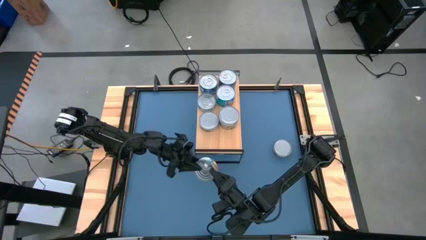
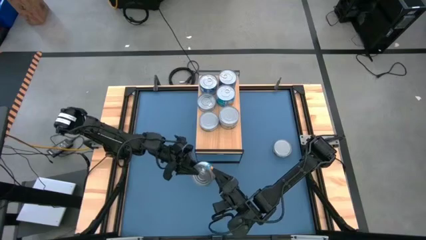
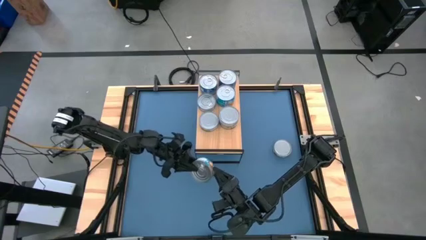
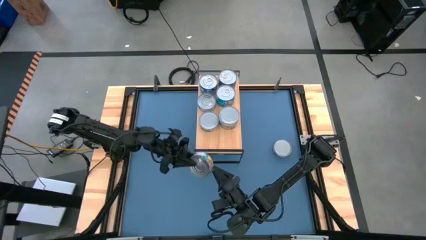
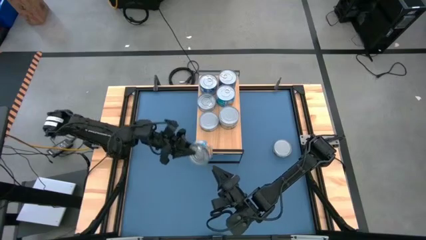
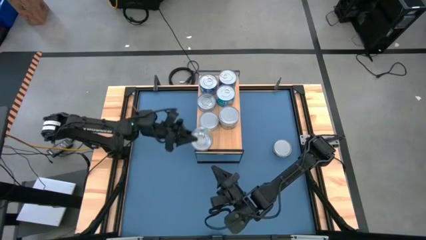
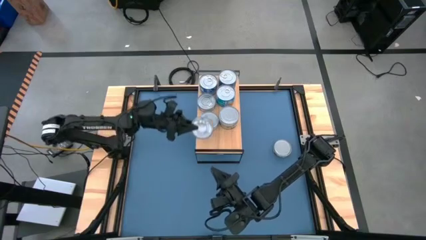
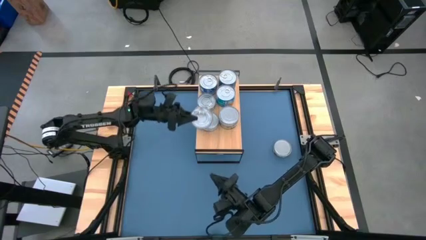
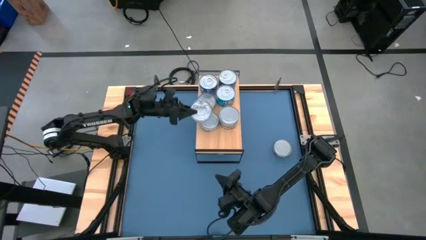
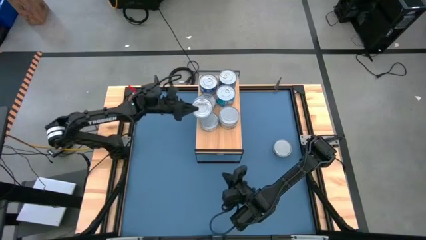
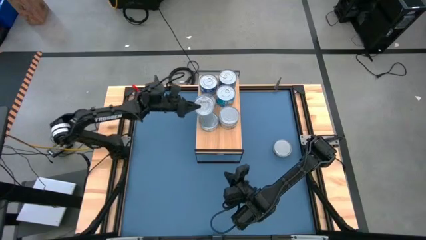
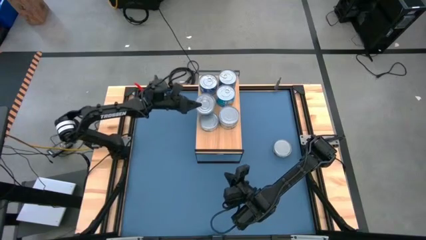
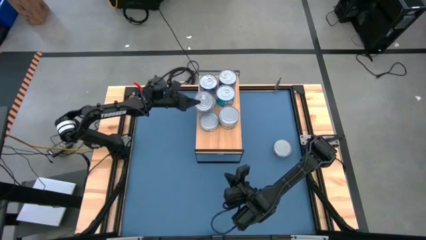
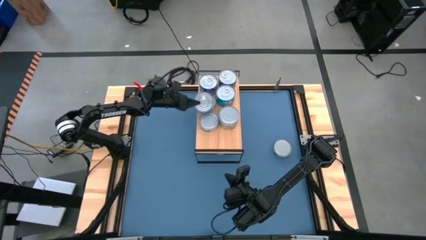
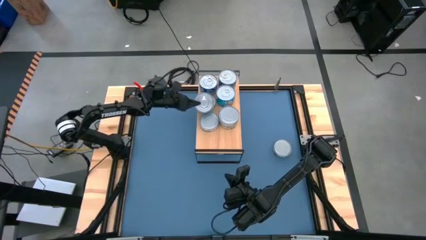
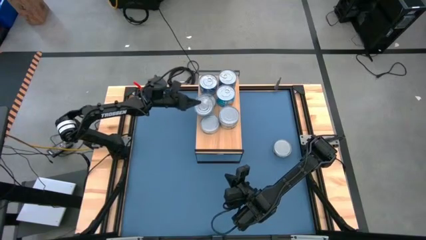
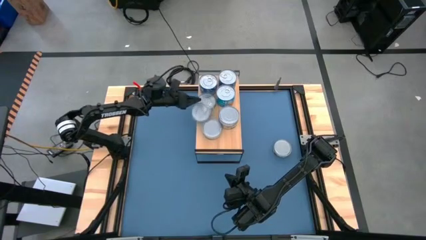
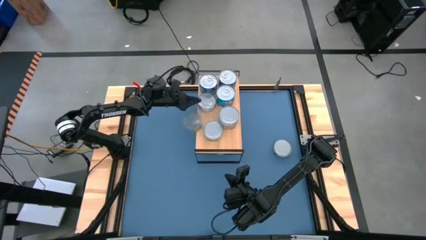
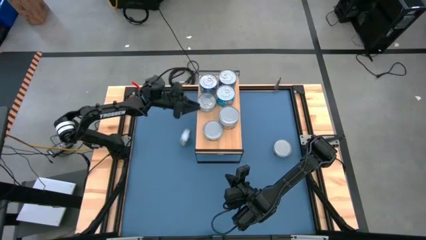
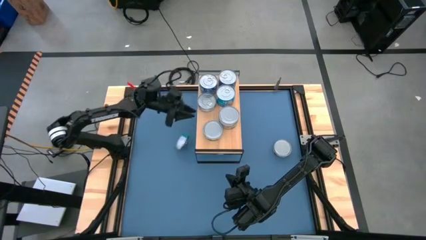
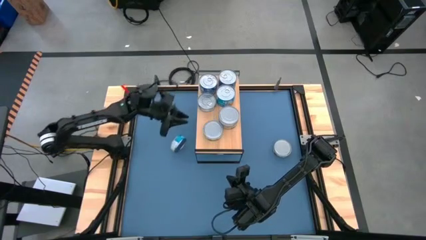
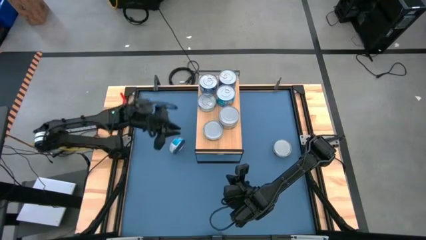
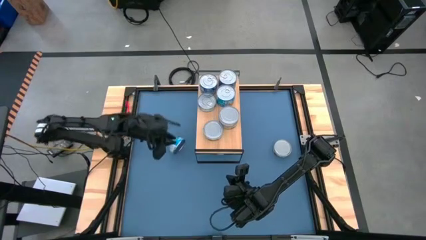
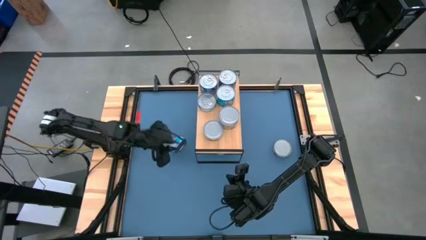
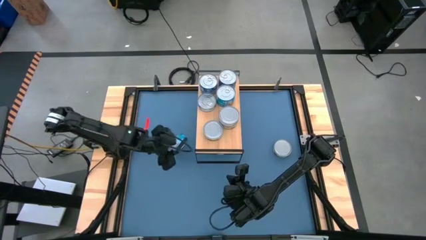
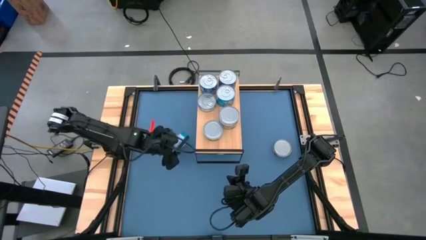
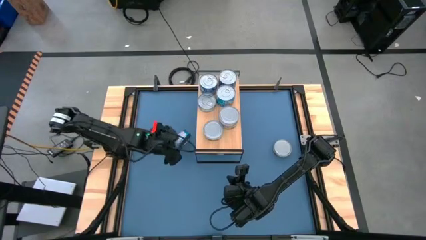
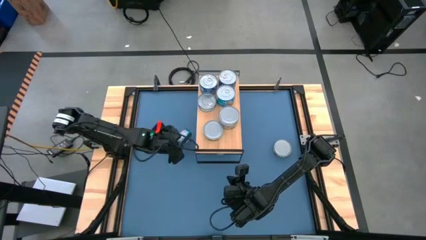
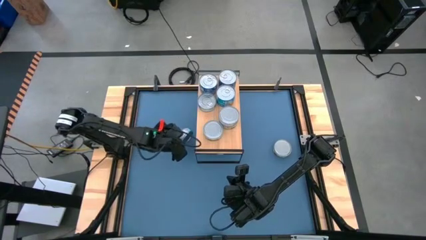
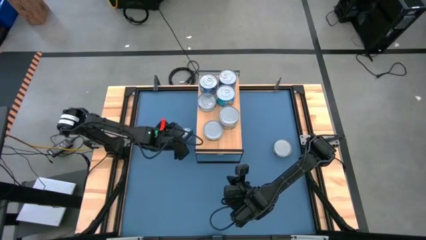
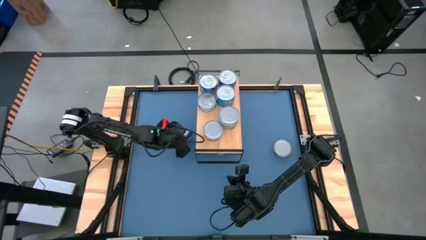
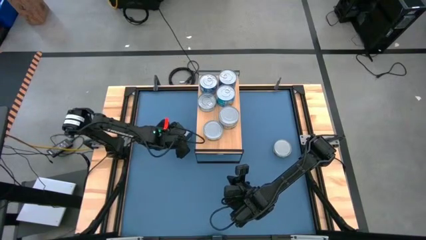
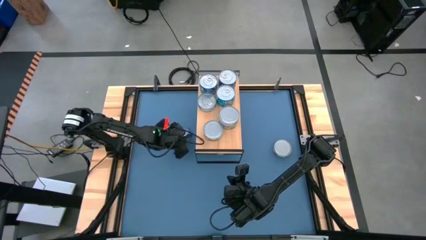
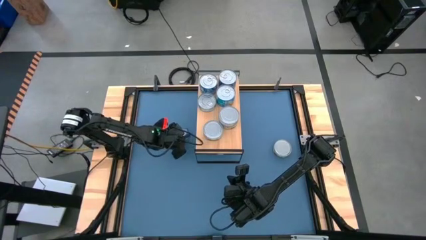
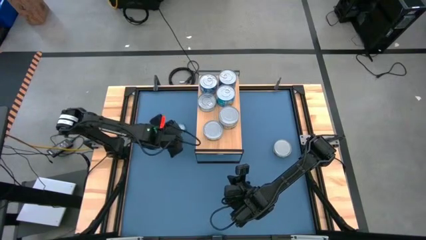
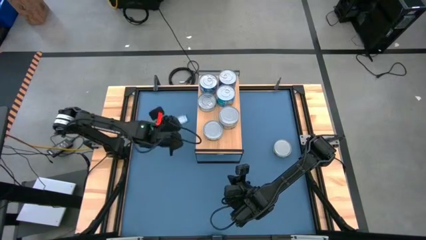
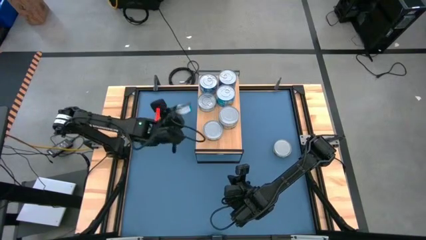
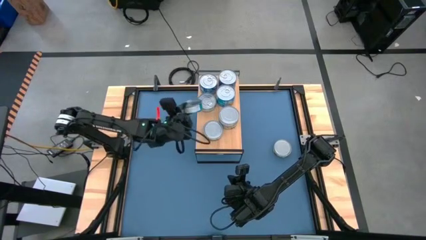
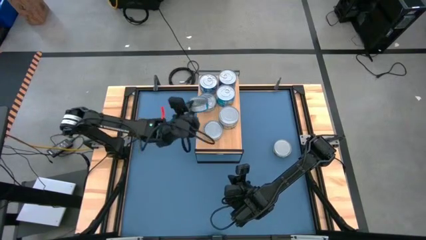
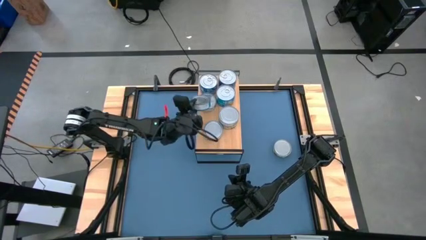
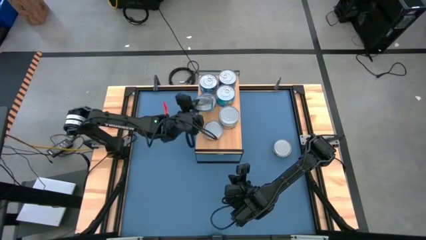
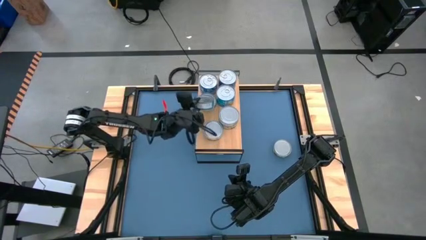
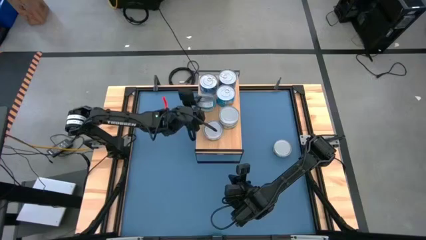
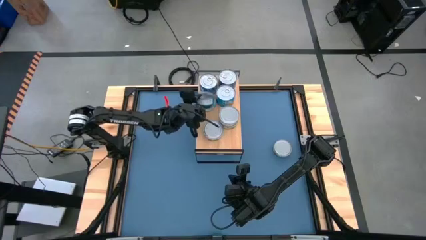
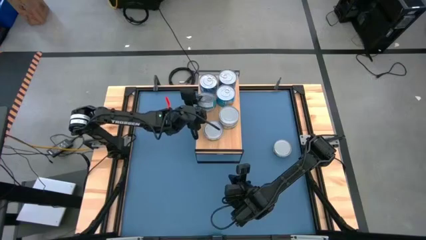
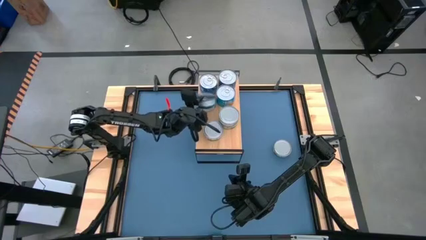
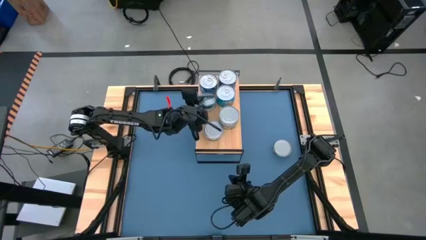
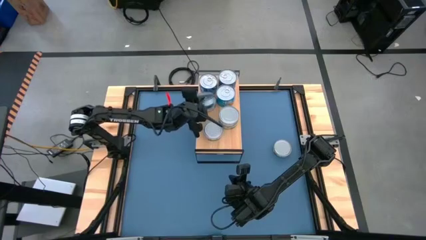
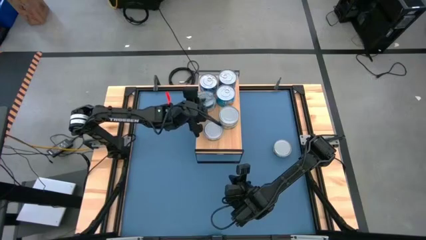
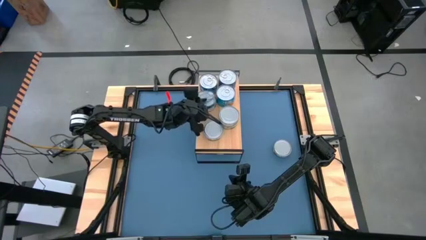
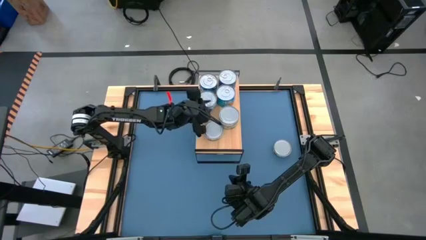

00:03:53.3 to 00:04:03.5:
Task: Stack canned seafood by type on shelf
Stack the yellow-blue tuna can on top of the other yellow-blue tuna can on the shelf

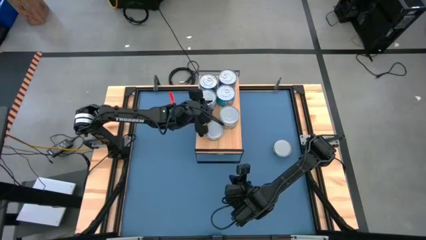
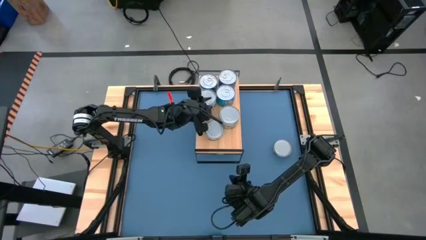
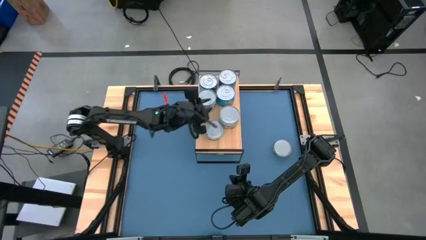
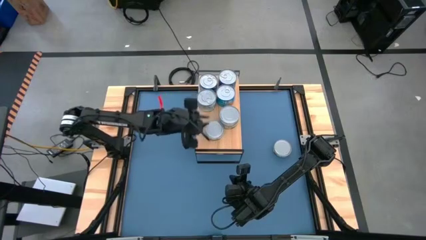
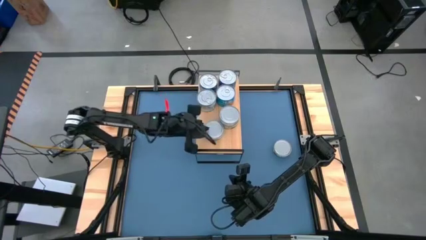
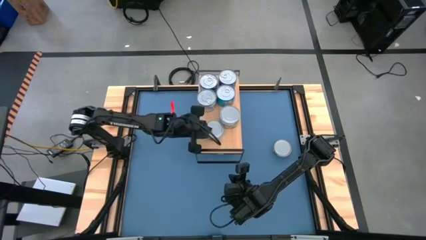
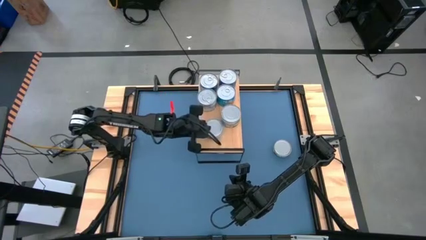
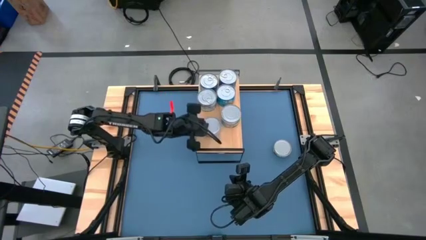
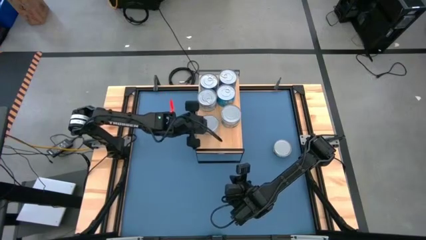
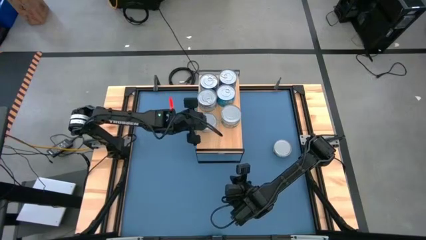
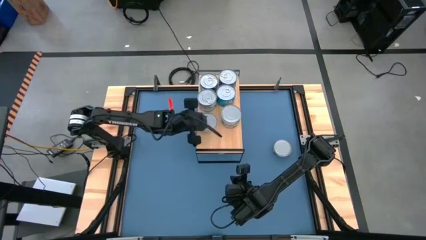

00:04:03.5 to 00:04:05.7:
Adjust the green tuna can on the shelf

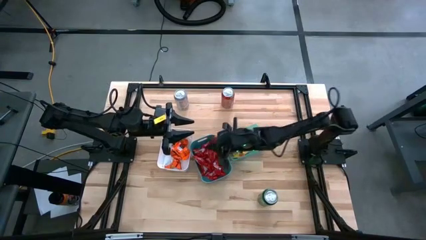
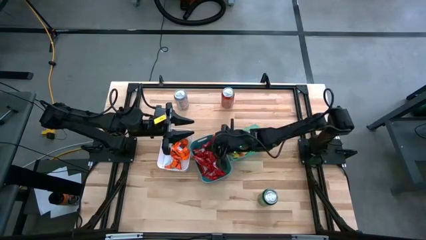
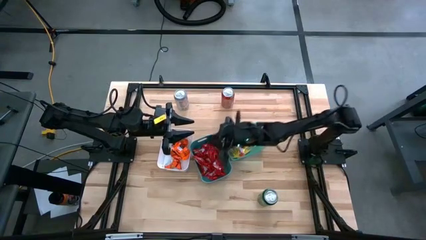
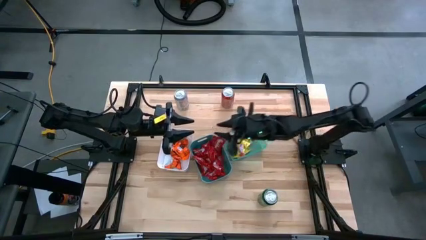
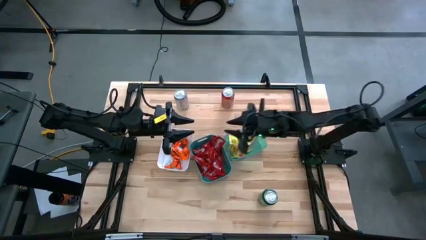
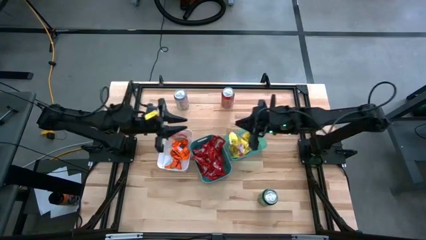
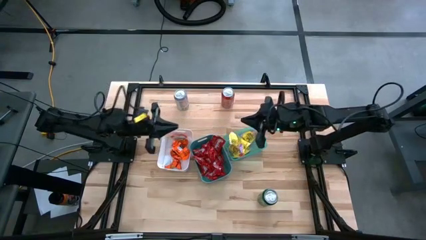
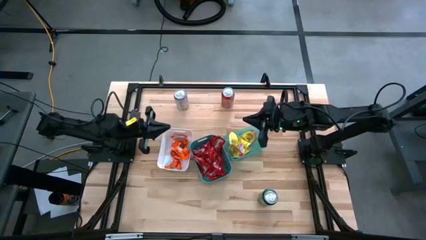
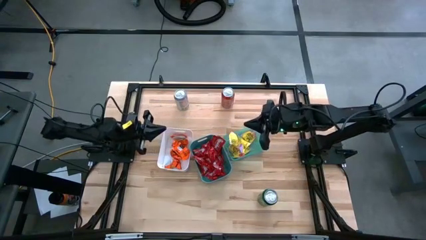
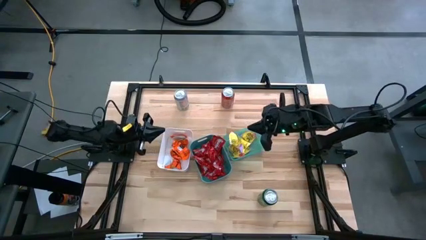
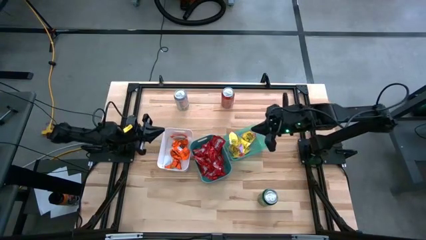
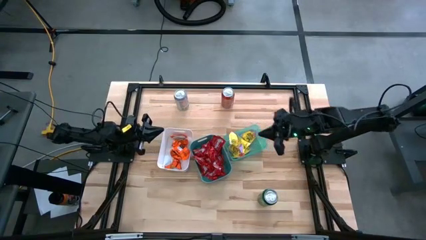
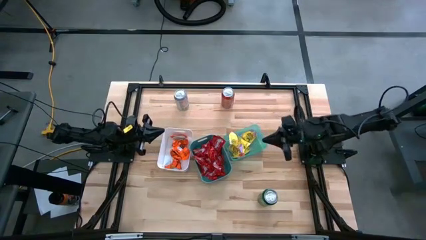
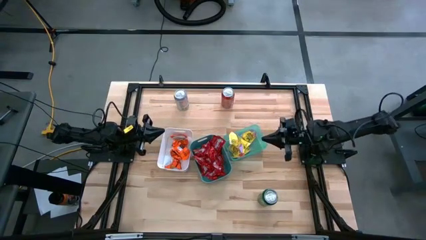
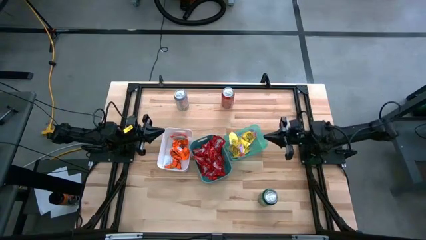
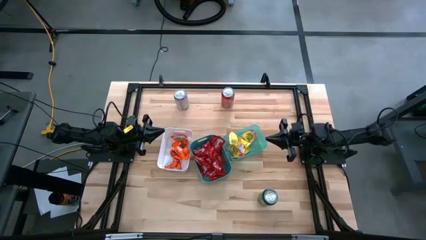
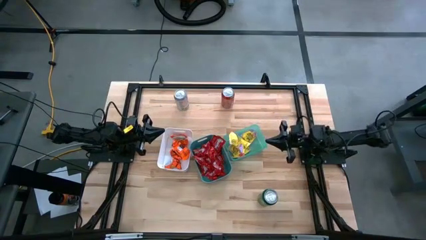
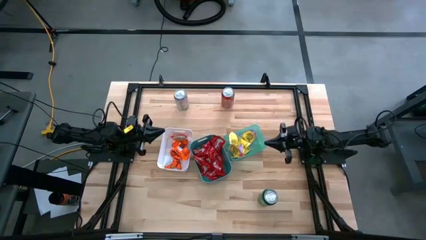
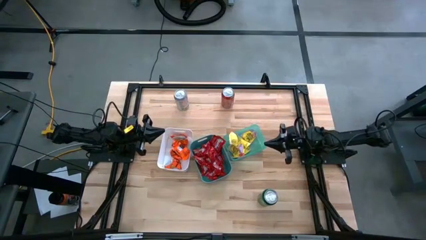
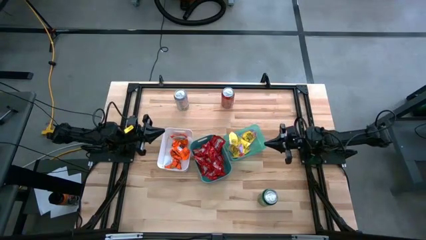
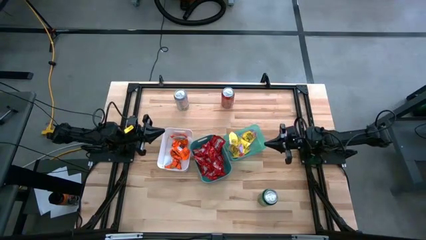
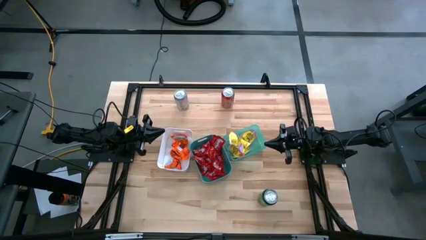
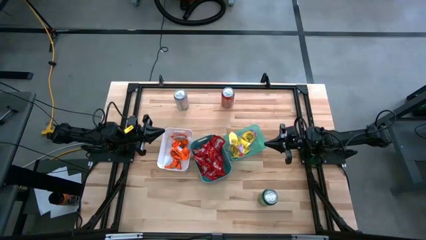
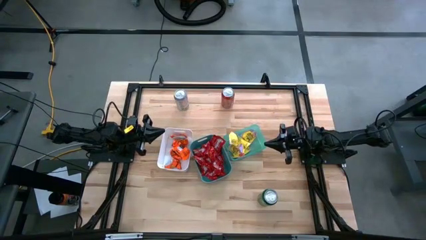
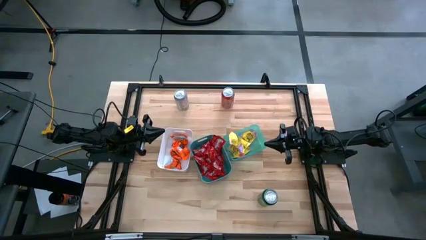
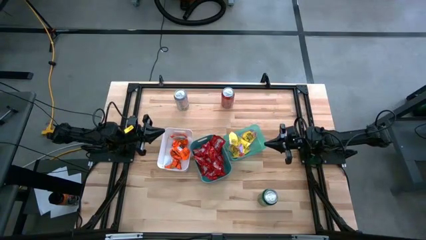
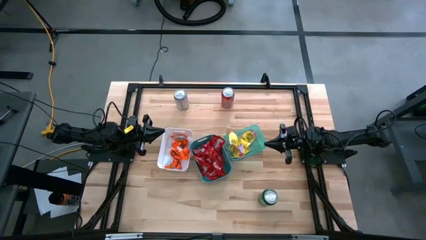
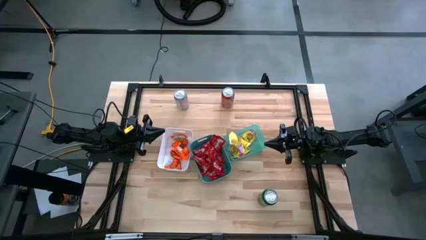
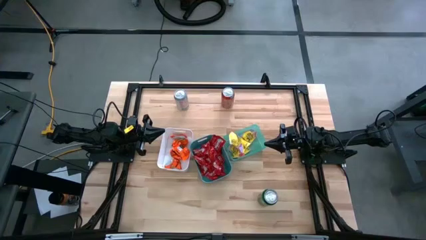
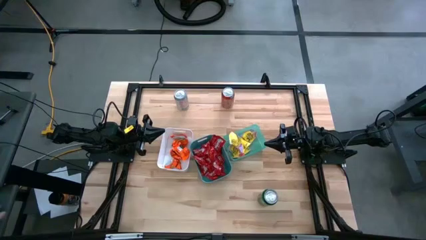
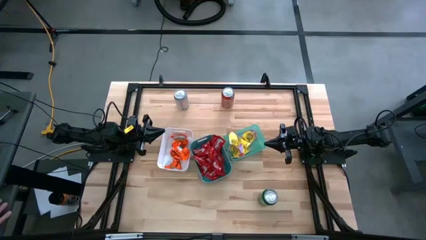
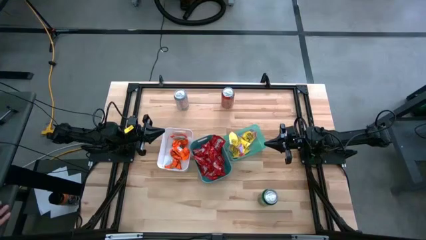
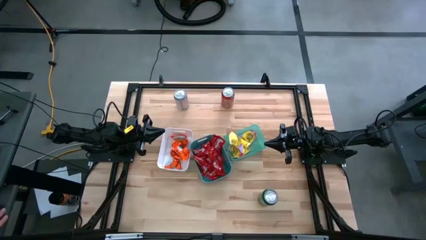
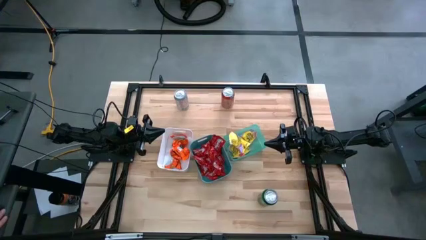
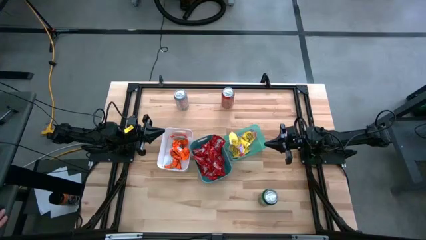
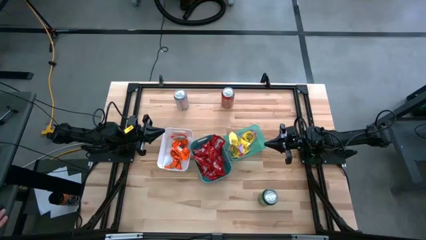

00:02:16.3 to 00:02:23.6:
Task: Sort candy
Return to Home Position
